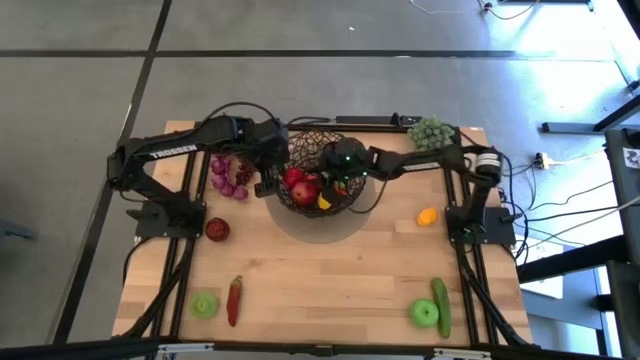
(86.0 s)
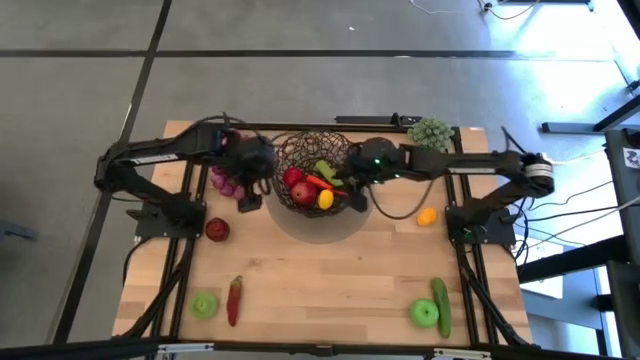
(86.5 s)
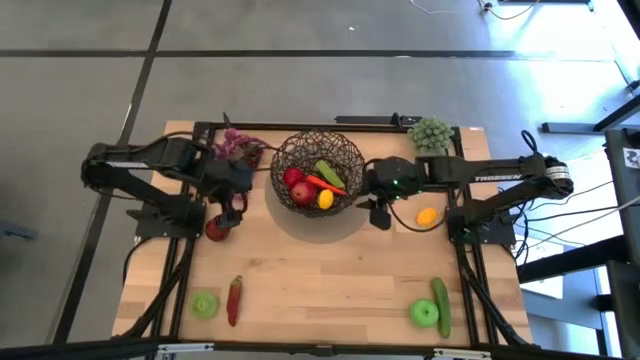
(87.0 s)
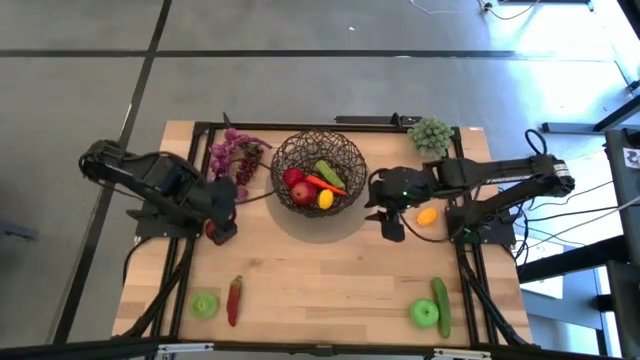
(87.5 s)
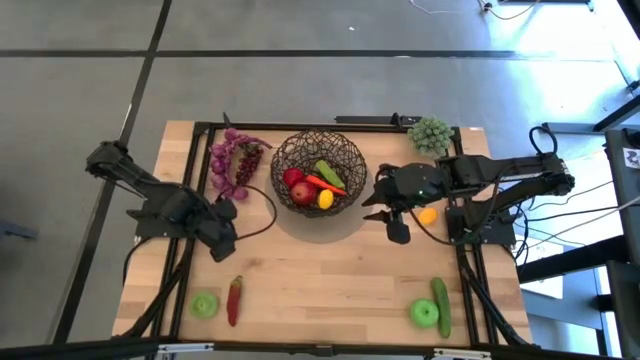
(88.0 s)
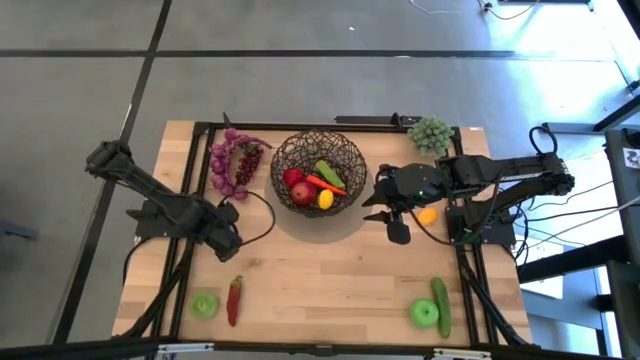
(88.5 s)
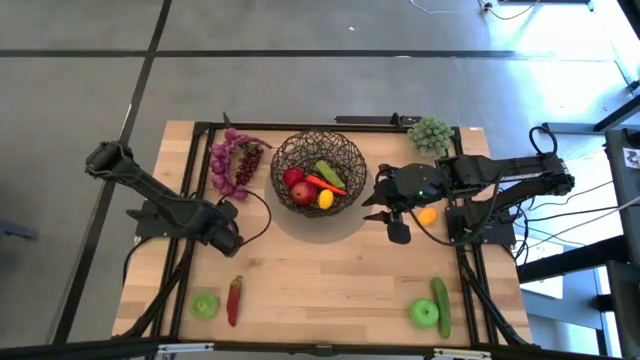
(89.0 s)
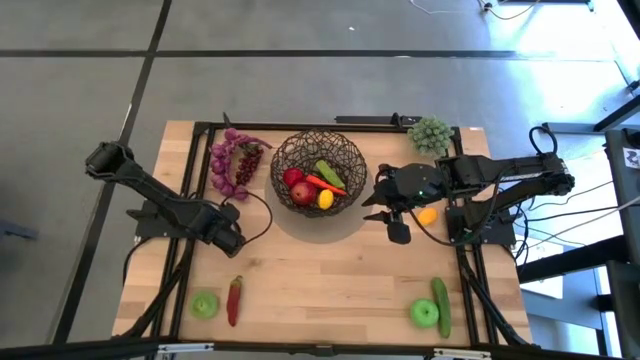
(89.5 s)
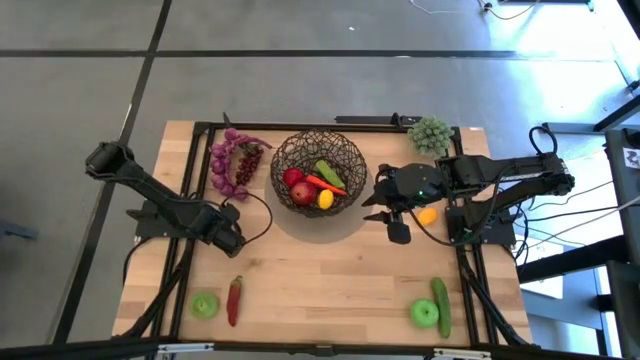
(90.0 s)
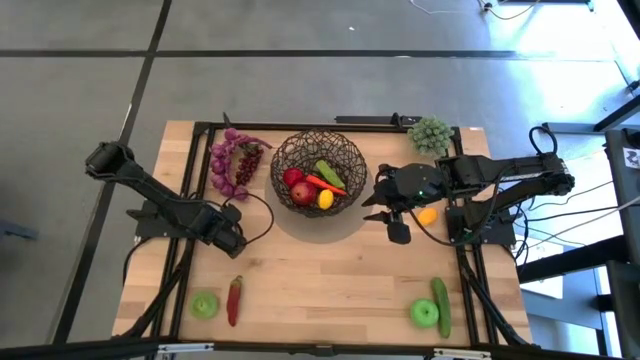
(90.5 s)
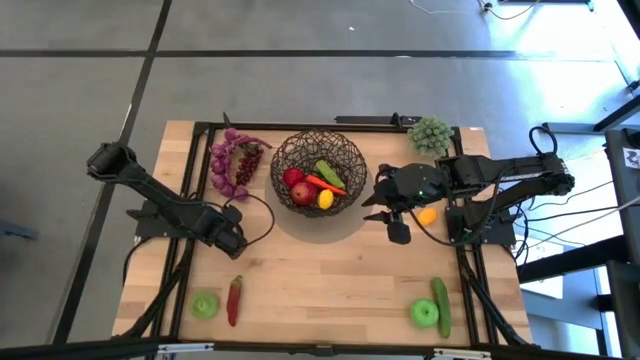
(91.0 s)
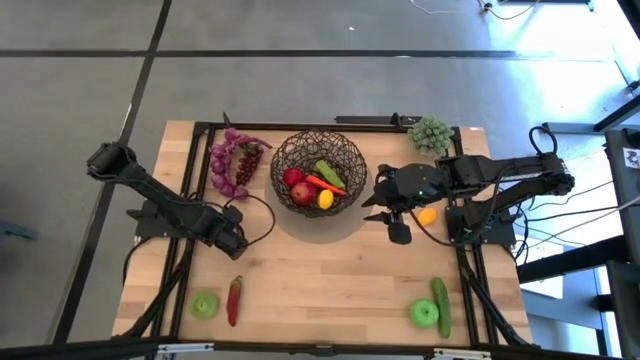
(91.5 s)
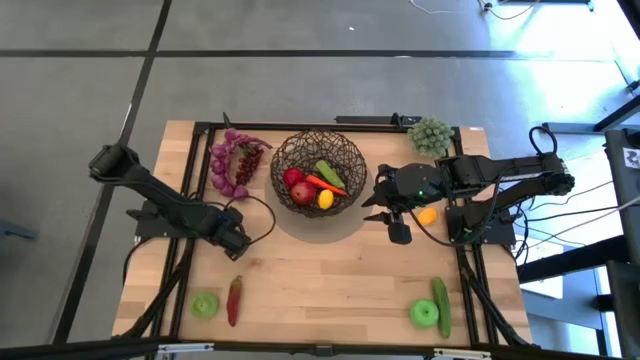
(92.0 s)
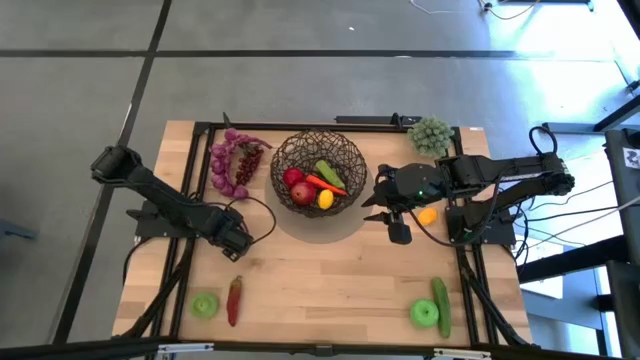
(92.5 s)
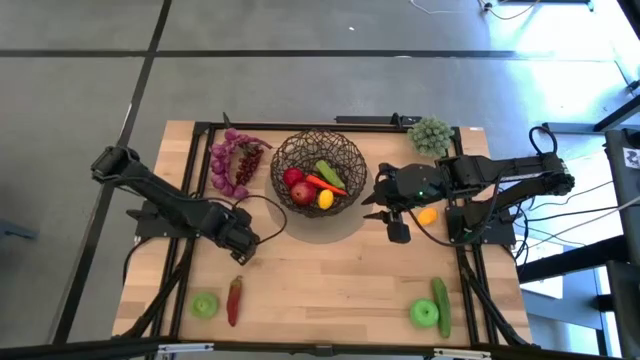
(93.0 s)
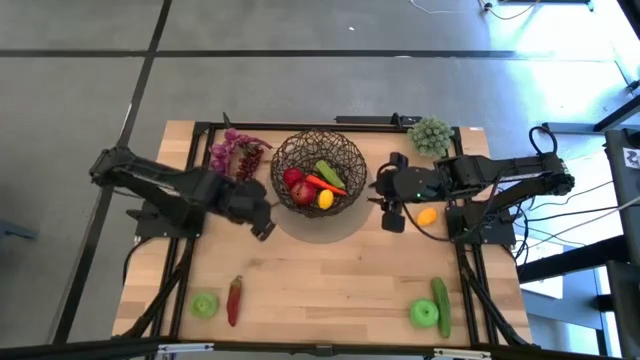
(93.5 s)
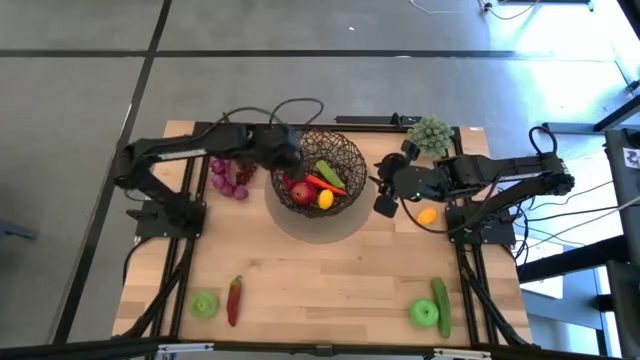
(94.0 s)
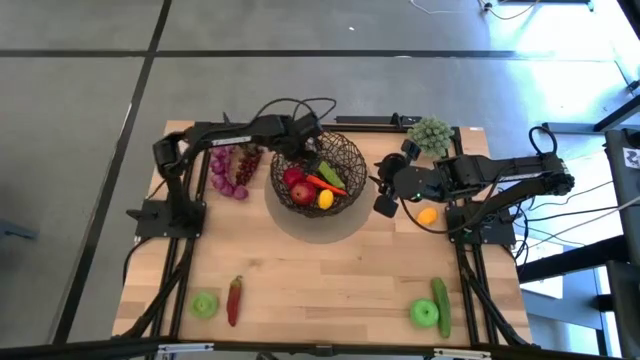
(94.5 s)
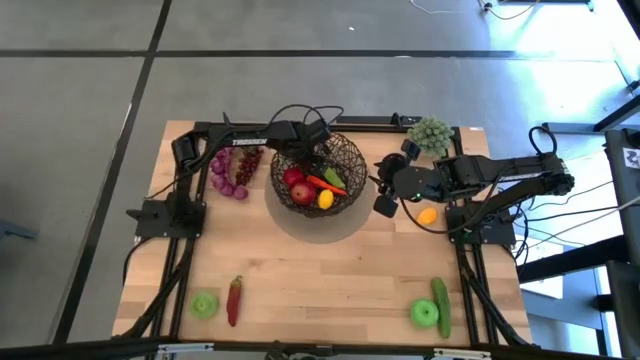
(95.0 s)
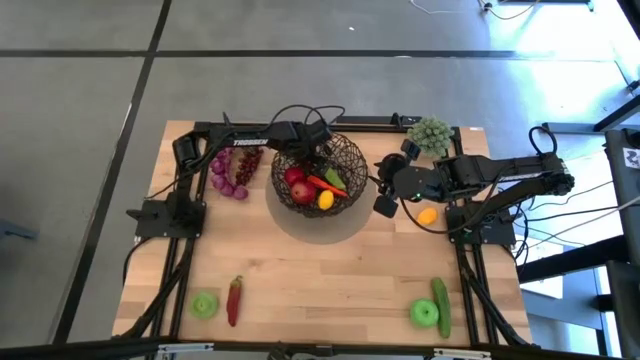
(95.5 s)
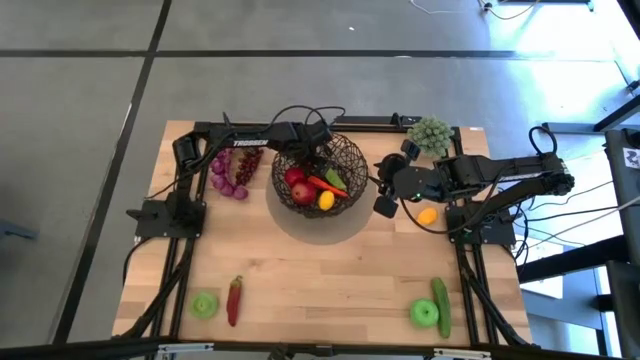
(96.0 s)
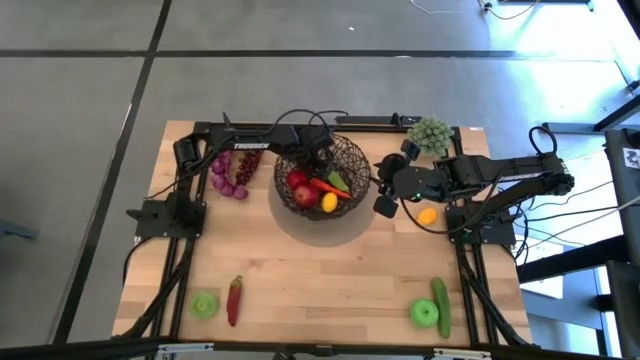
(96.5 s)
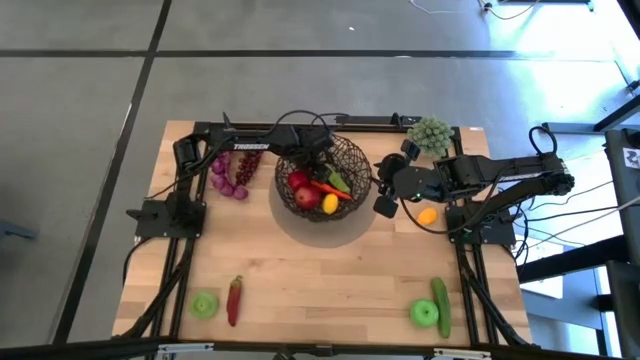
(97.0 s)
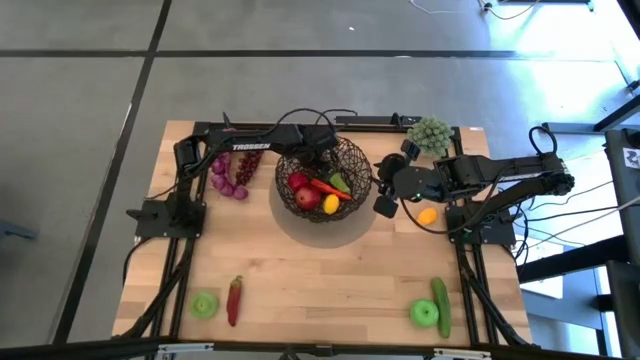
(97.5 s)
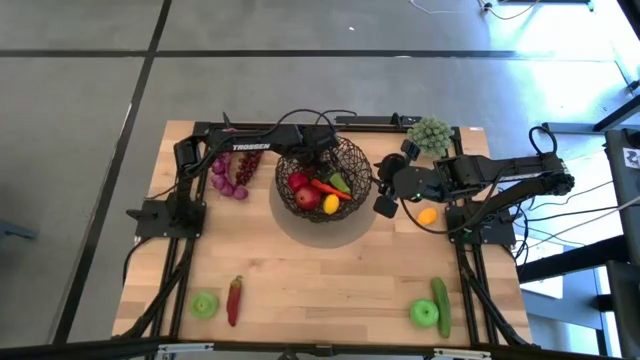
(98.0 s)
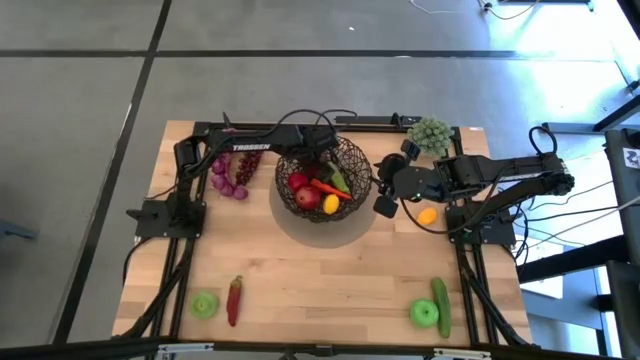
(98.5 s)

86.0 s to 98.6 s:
Task: Build produce basket
Put the red apple into the wire basket
